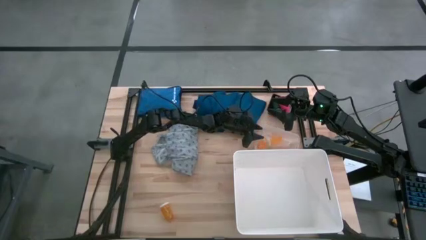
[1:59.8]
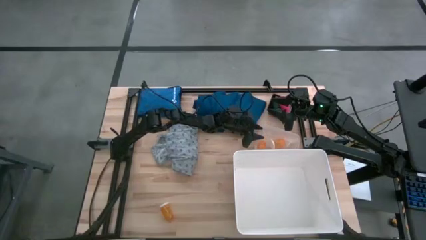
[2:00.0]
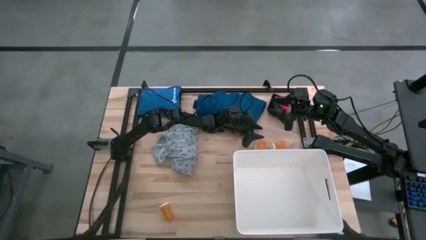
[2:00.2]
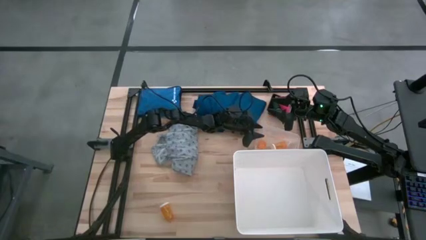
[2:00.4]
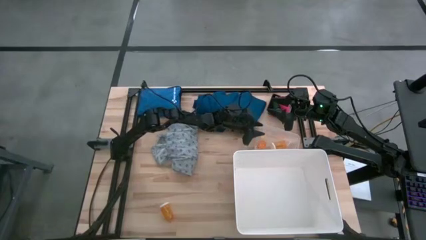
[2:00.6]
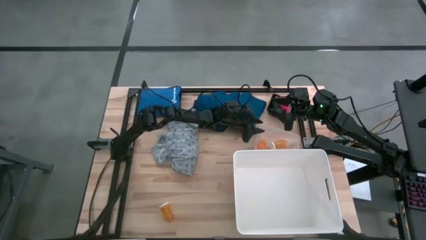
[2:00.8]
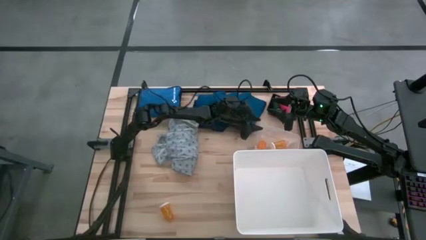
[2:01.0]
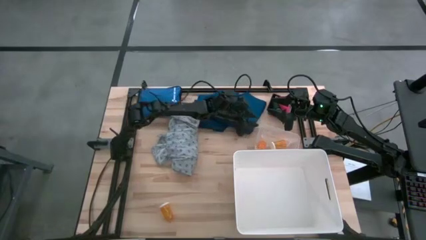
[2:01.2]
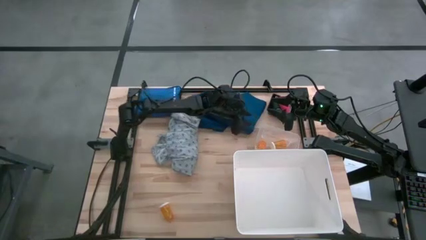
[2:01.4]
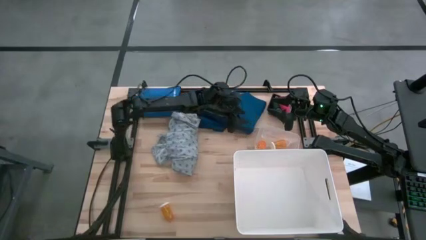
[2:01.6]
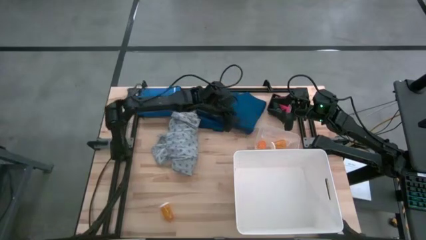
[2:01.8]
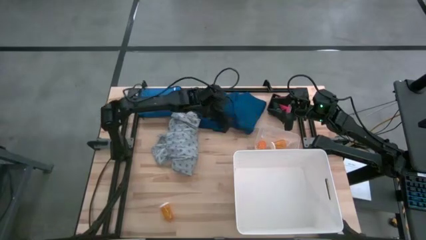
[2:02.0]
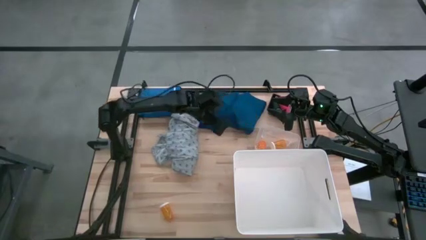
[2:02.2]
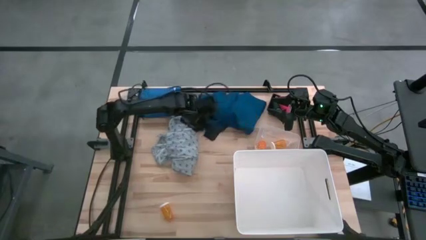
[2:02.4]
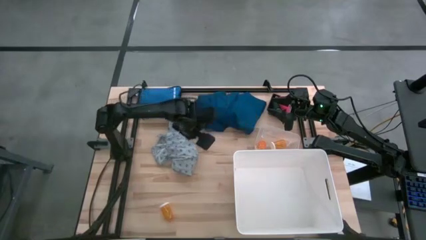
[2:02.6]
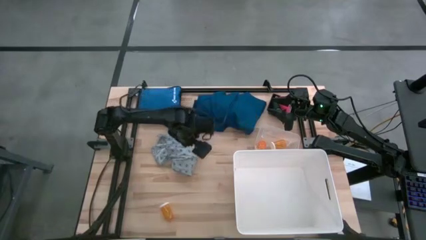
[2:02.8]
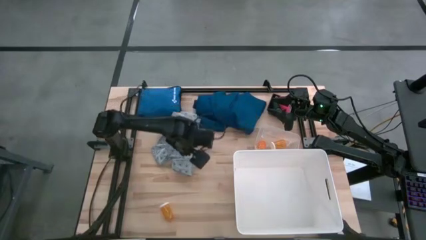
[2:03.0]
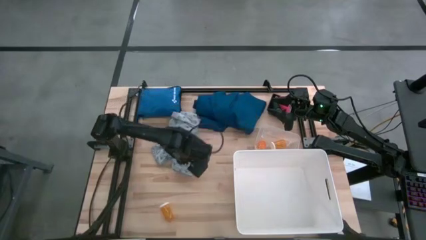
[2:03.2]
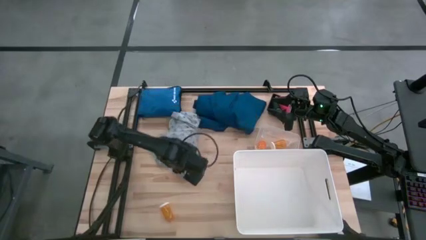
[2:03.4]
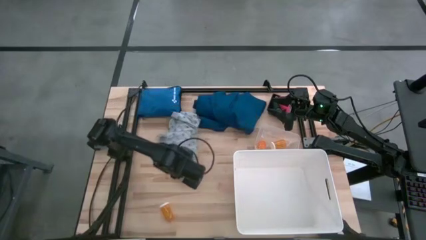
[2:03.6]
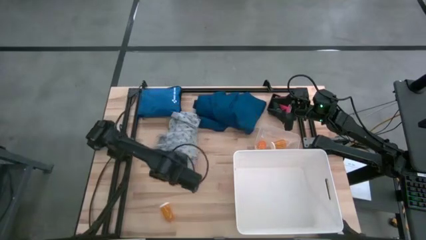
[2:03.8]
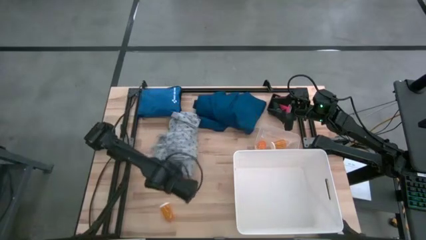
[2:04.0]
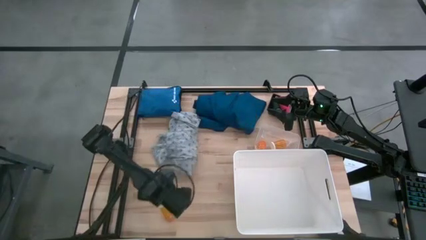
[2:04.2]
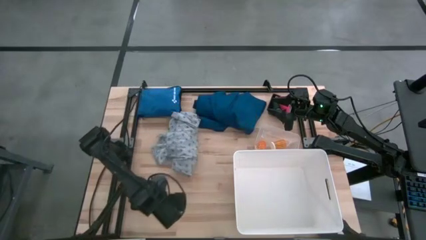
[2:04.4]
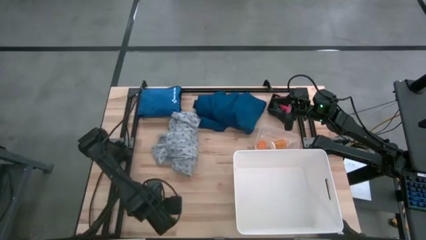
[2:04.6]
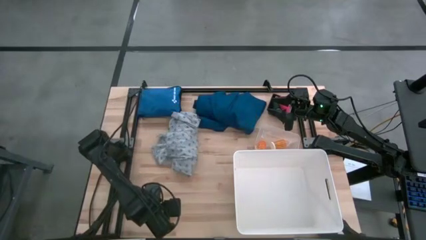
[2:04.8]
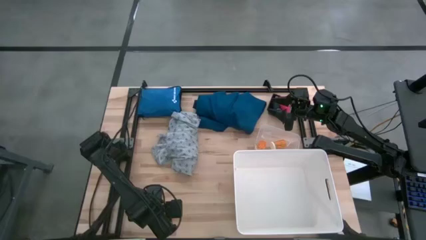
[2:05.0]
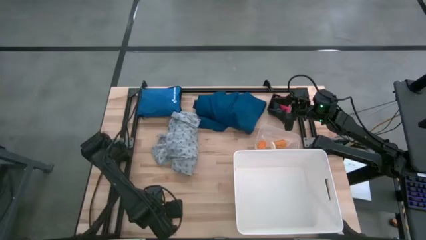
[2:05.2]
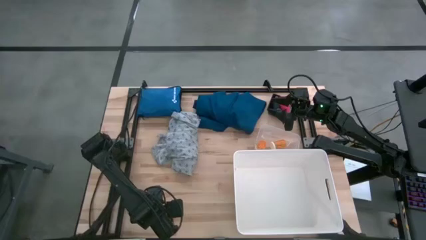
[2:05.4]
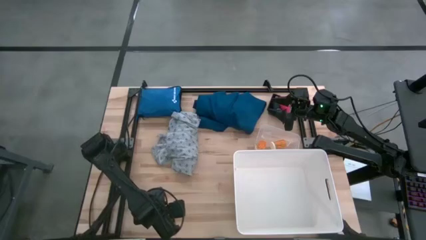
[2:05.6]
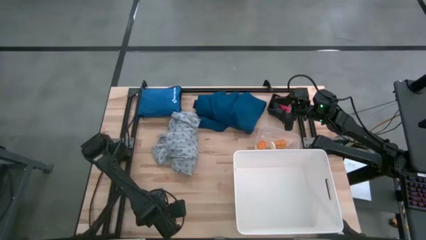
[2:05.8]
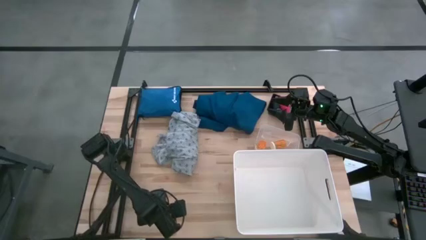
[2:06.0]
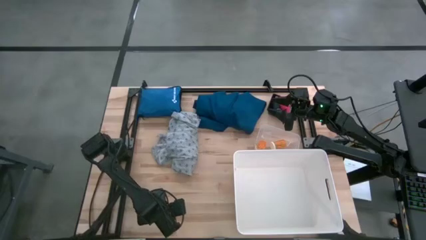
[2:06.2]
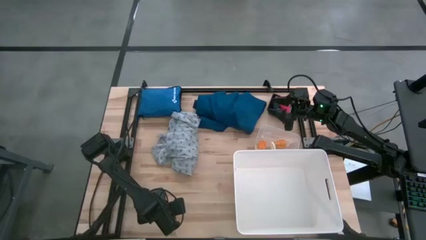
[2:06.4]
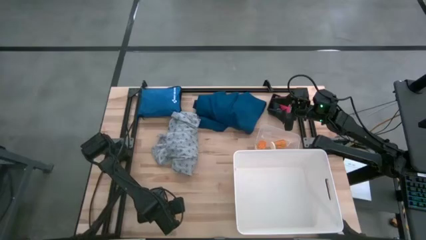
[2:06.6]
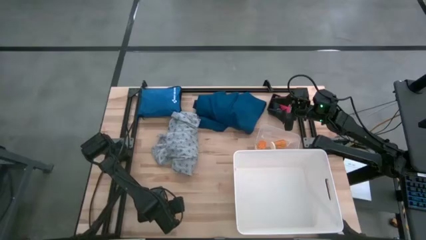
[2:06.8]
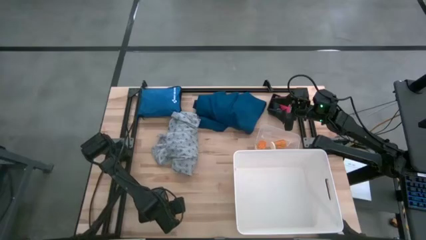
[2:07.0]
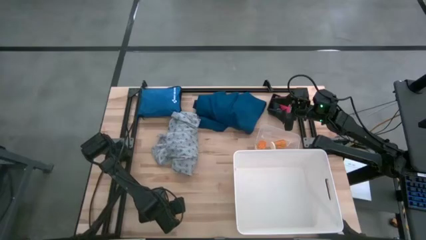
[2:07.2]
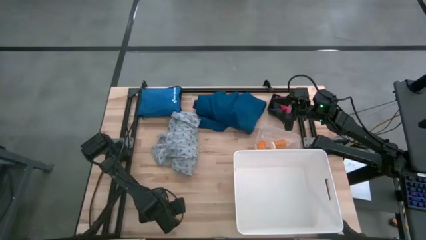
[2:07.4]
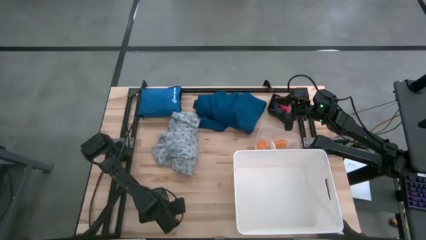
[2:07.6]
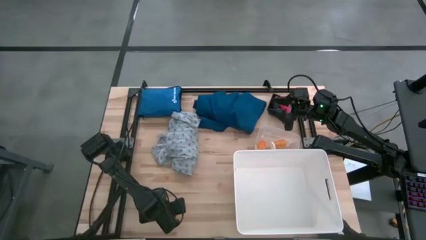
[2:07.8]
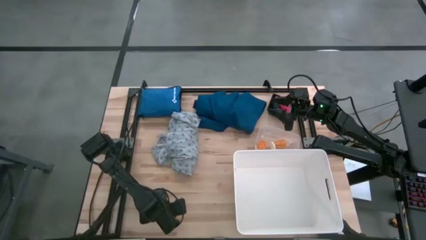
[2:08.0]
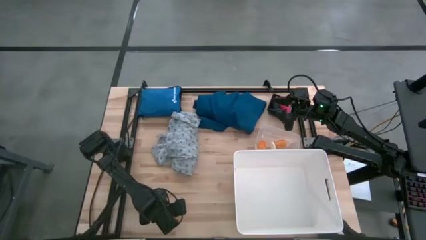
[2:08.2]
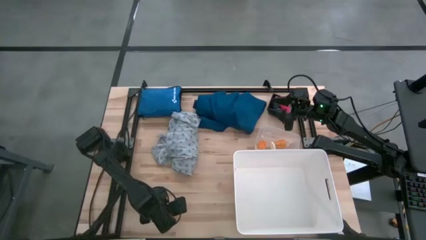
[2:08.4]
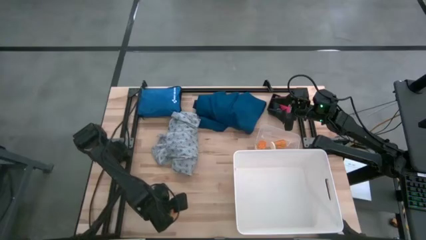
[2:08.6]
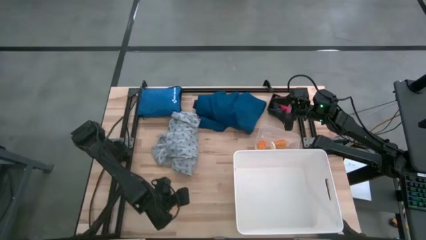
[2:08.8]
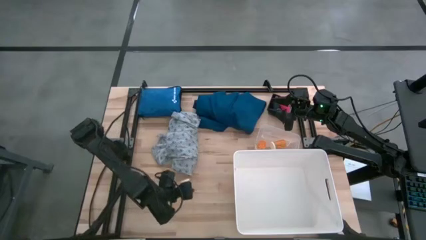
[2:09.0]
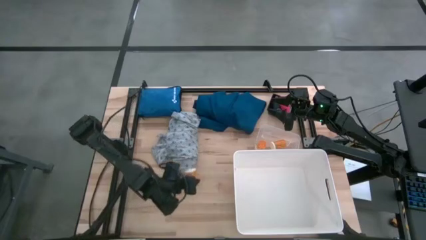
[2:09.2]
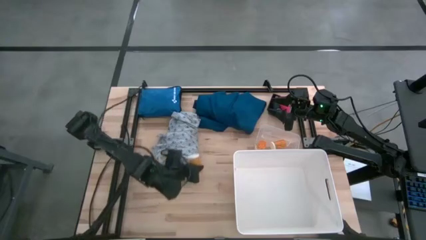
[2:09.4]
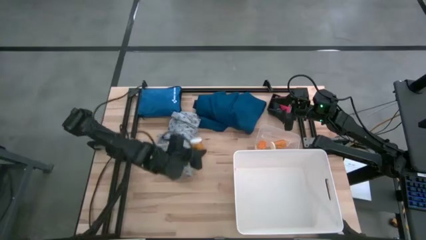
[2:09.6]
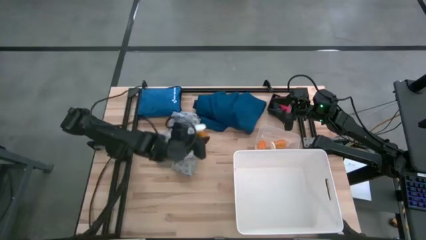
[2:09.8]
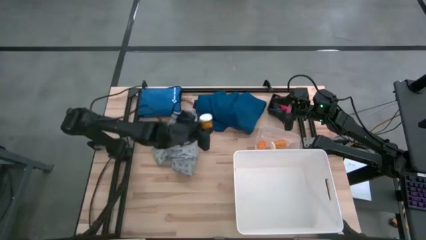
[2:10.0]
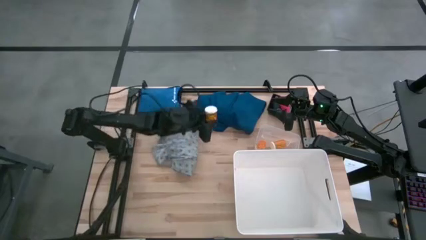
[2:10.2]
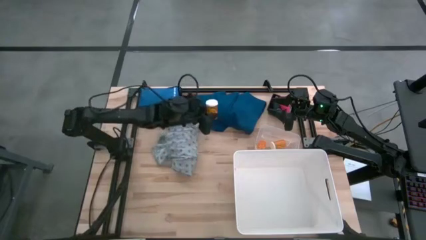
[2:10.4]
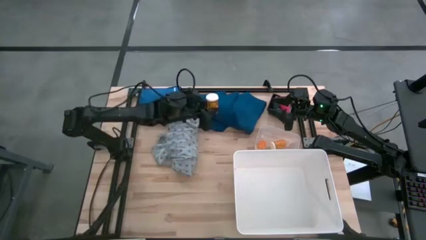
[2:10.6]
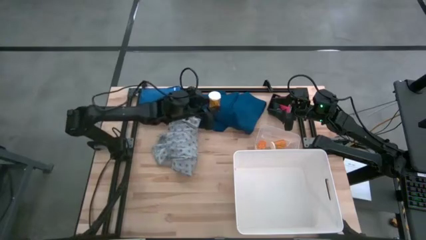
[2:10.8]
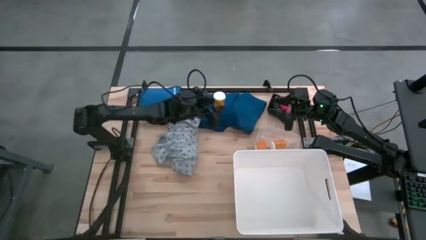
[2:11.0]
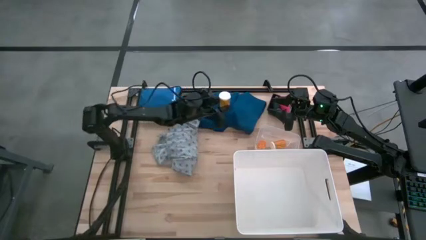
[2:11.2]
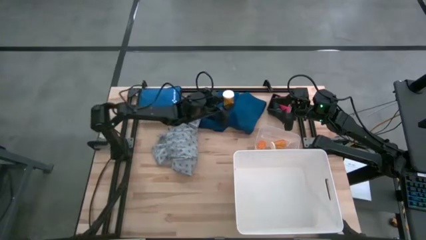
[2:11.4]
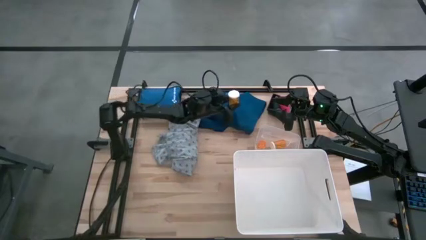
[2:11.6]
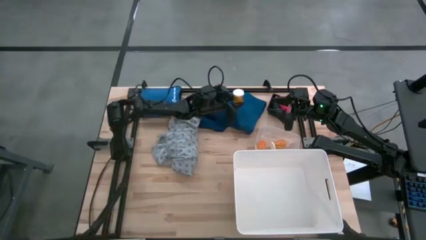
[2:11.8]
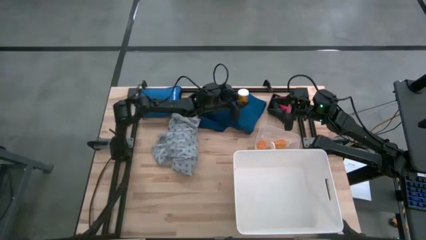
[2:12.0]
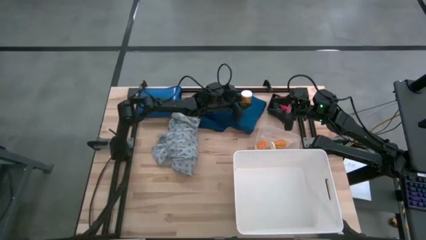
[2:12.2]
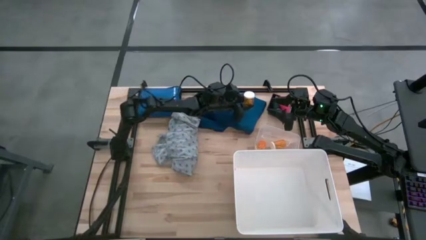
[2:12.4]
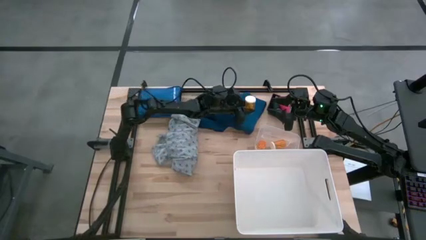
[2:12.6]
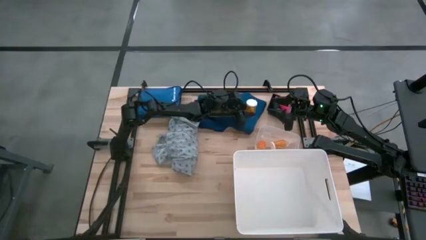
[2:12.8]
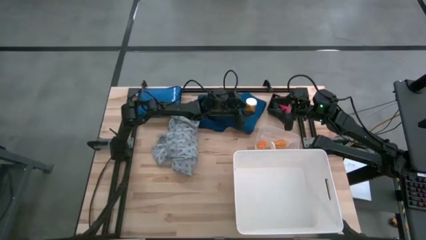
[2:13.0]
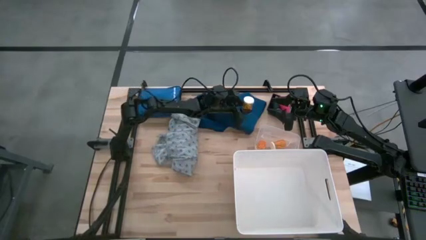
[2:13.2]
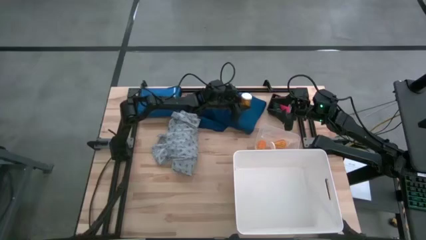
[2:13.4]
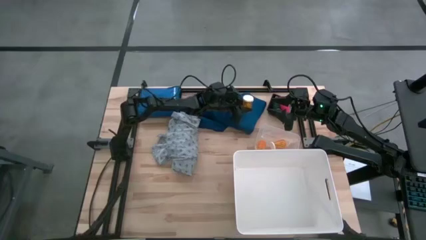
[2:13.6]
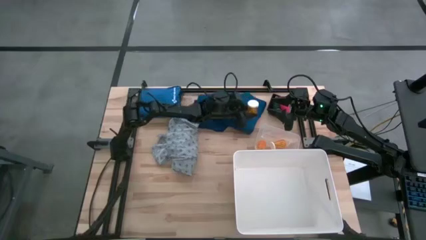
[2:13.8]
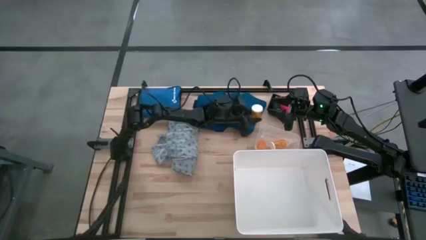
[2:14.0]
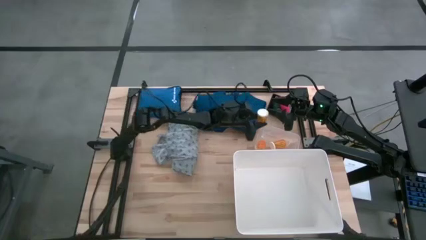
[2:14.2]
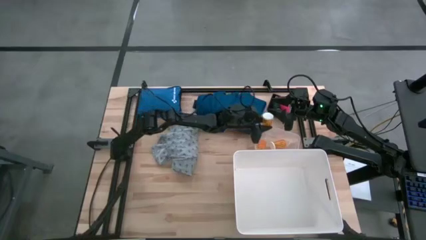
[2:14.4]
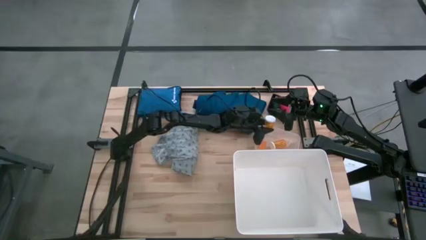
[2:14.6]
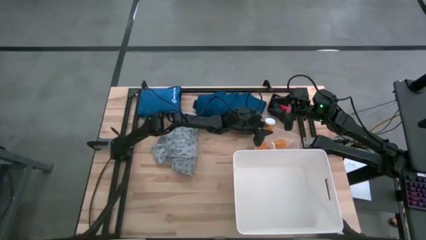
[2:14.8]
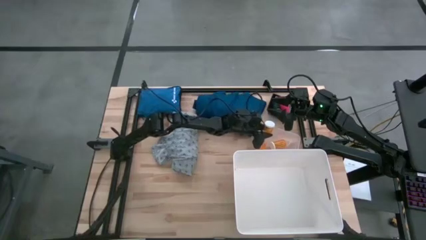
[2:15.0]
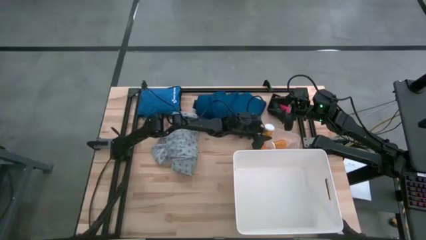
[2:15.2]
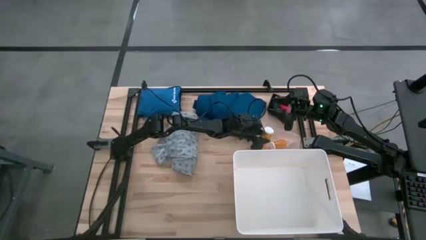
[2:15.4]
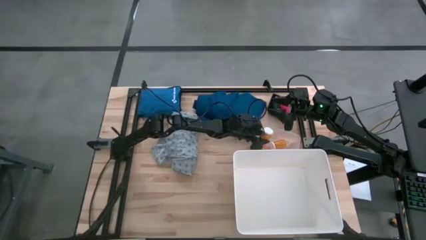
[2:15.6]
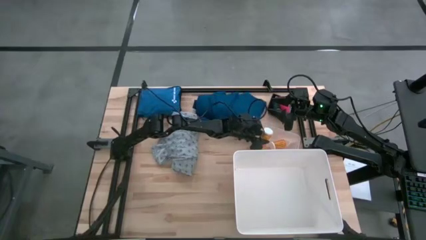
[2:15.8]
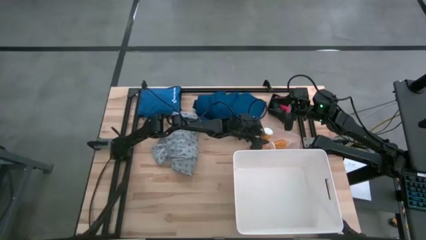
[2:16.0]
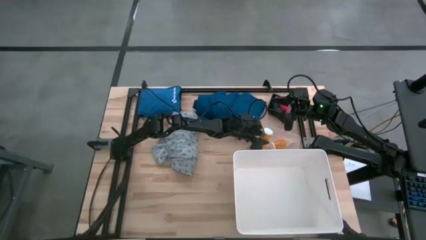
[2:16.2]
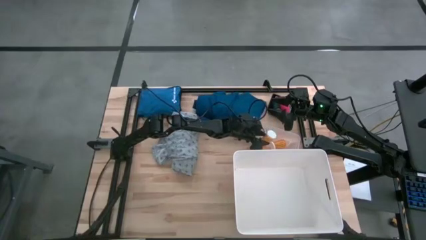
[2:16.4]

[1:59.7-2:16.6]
Task: Pick & place medical supplies in basket/bin
Put the orange pill bottle into the transparent bin

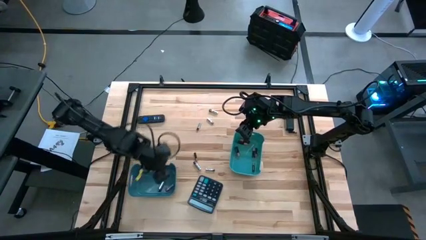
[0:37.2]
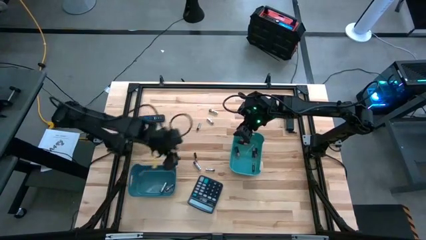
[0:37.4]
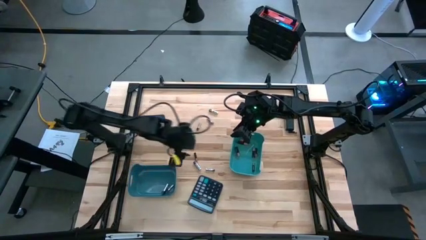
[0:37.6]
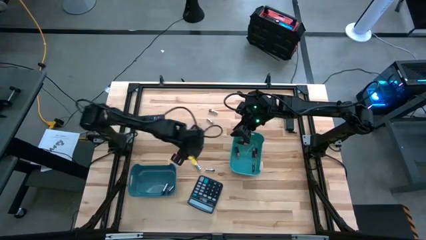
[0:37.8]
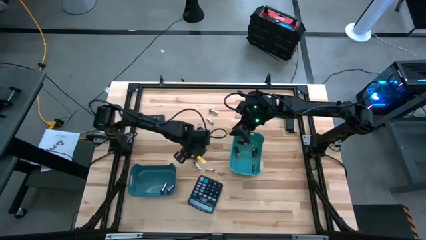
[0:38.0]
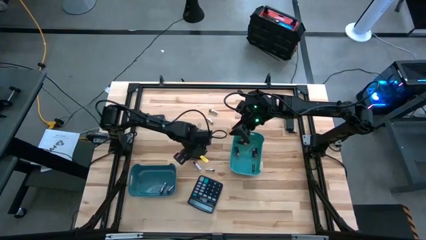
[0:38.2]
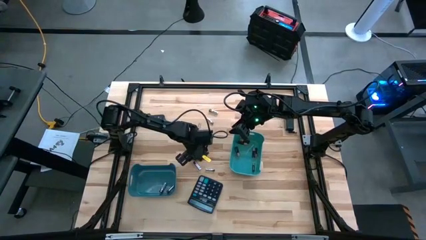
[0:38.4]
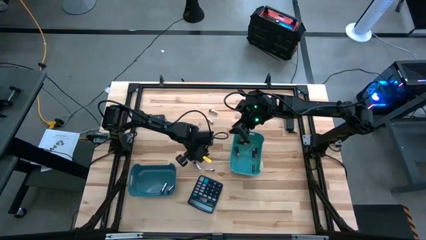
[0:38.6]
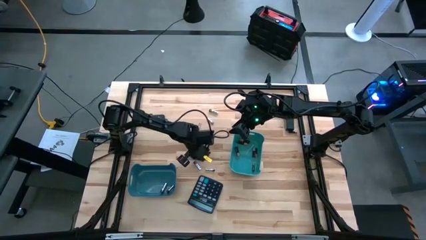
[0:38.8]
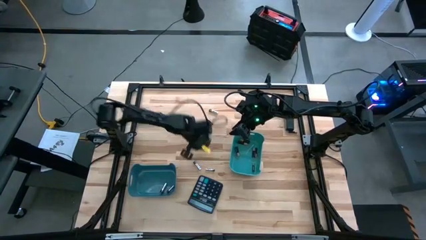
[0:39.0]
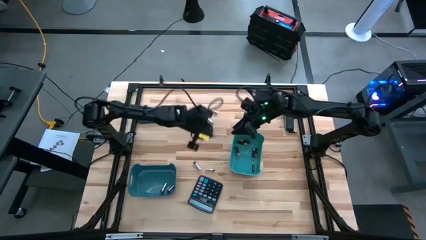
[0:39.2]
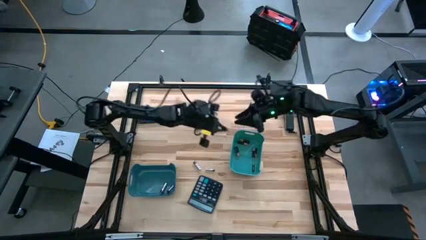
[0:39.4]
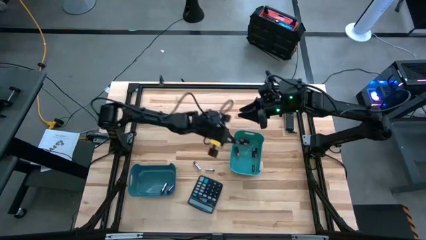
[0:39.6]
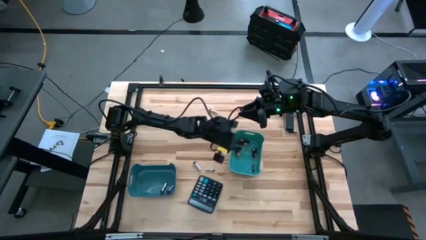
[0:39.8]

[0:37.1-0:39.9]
Task: Sort batteries
Put the black battery into the dark green bin
